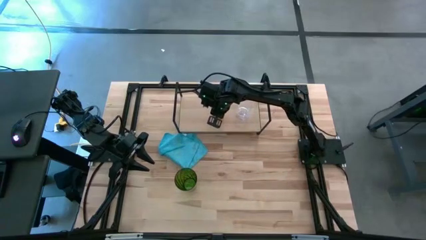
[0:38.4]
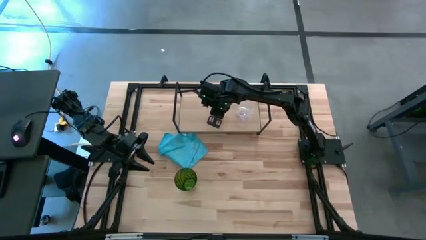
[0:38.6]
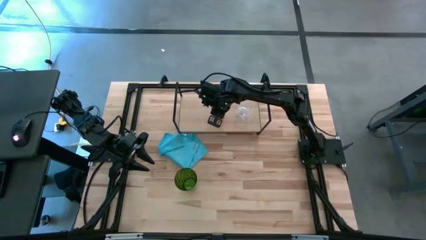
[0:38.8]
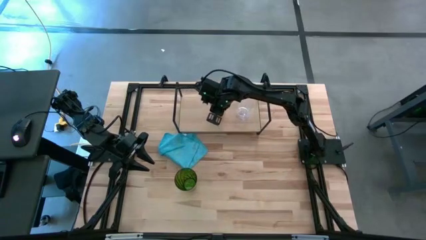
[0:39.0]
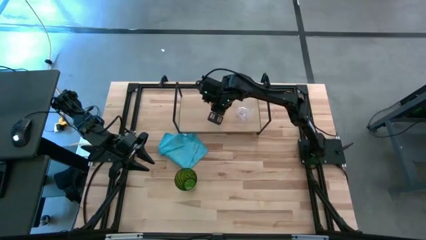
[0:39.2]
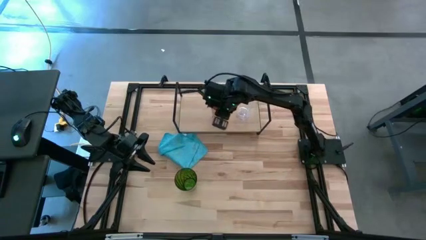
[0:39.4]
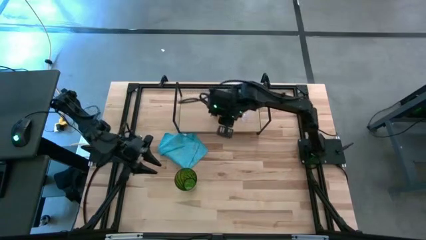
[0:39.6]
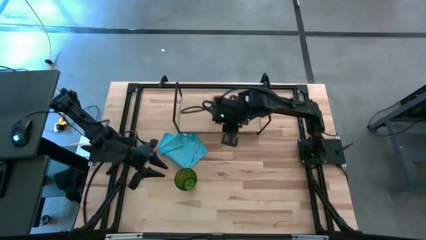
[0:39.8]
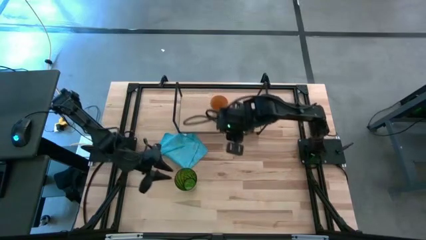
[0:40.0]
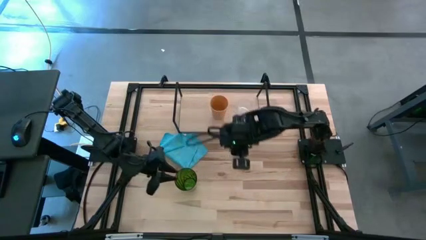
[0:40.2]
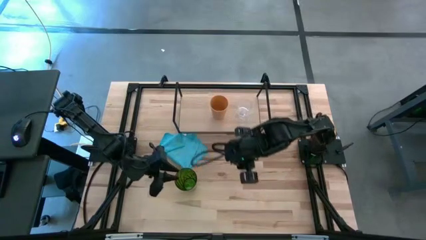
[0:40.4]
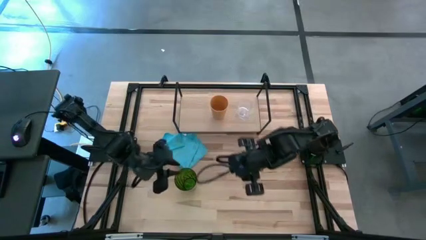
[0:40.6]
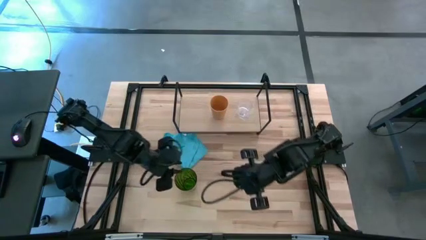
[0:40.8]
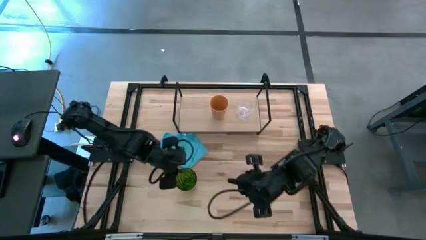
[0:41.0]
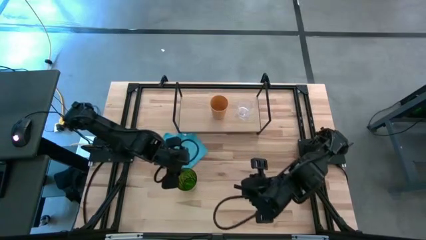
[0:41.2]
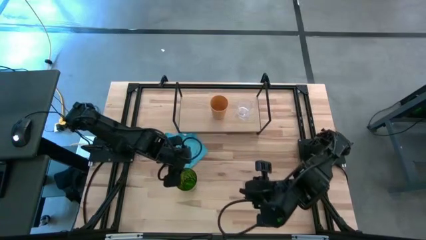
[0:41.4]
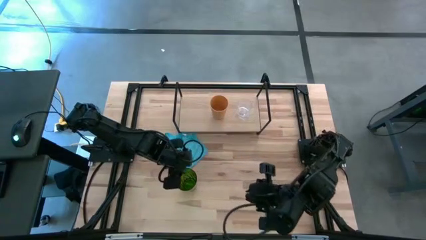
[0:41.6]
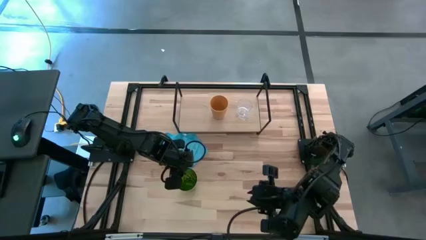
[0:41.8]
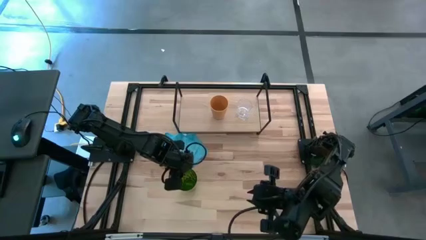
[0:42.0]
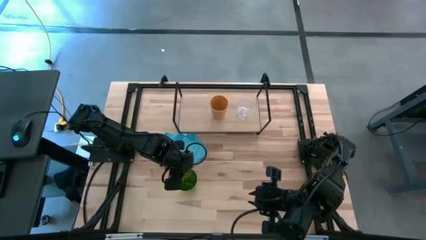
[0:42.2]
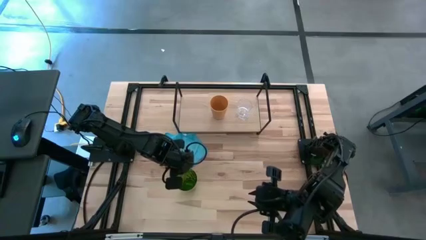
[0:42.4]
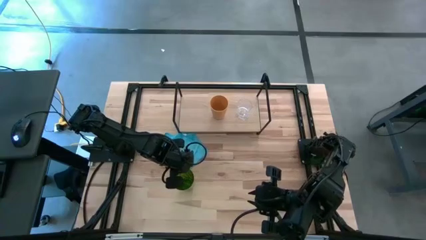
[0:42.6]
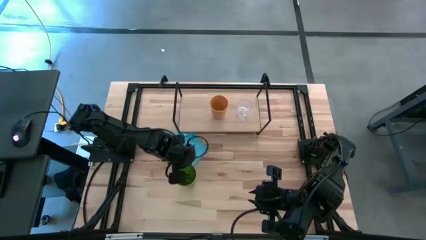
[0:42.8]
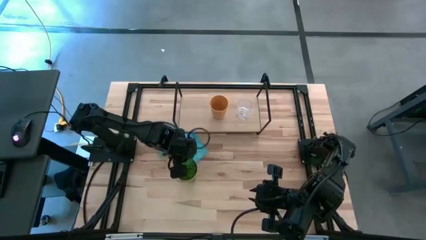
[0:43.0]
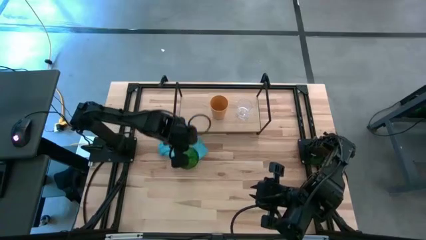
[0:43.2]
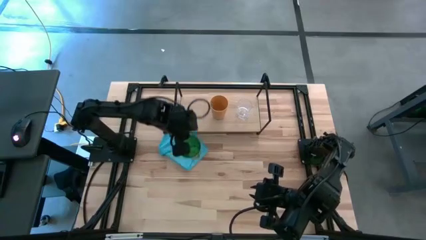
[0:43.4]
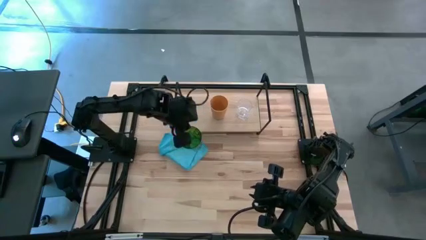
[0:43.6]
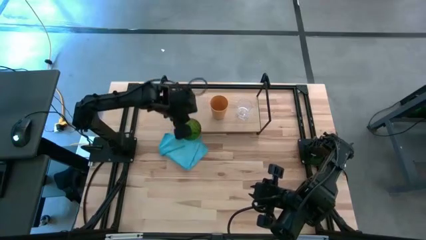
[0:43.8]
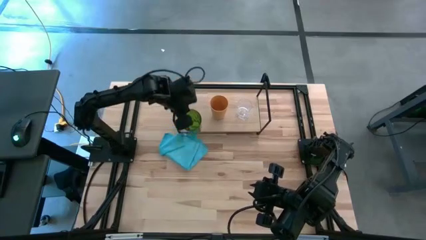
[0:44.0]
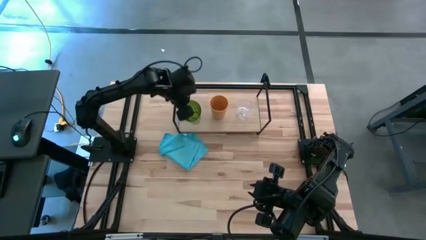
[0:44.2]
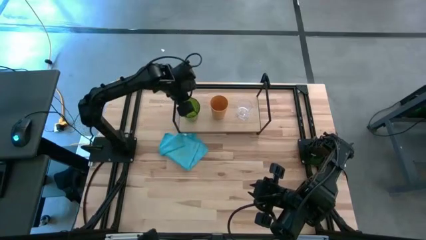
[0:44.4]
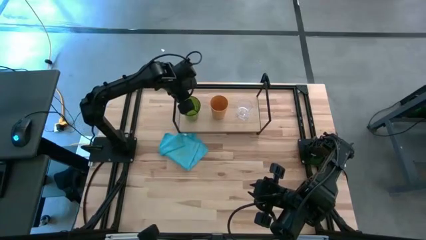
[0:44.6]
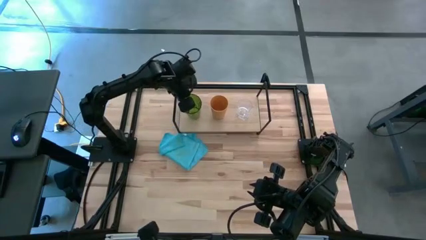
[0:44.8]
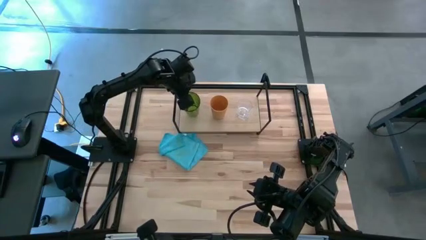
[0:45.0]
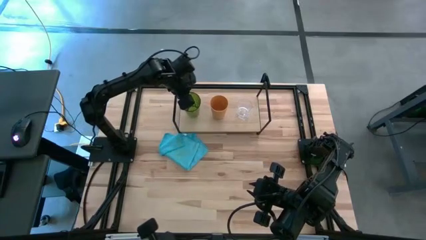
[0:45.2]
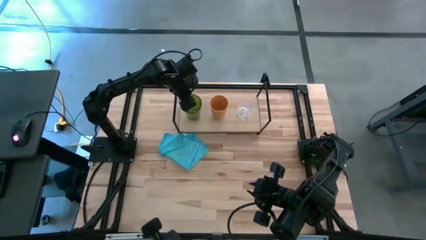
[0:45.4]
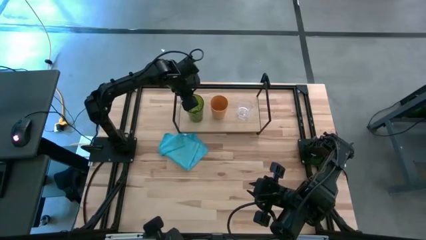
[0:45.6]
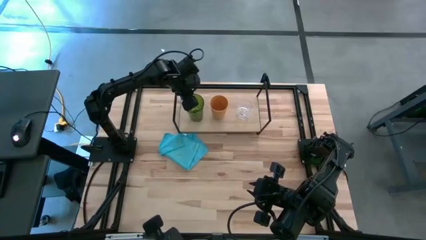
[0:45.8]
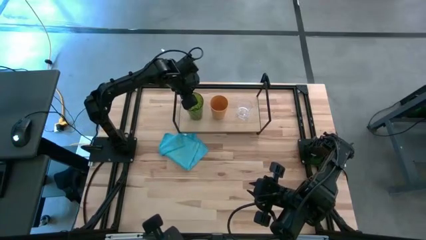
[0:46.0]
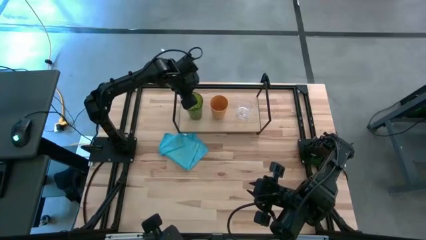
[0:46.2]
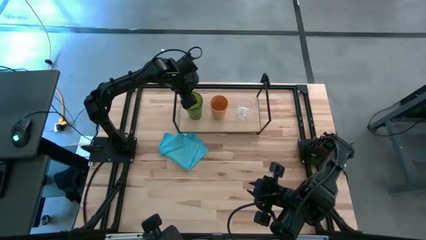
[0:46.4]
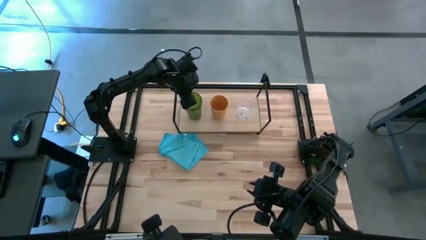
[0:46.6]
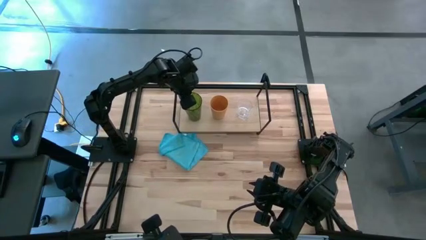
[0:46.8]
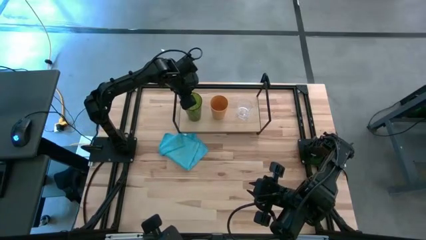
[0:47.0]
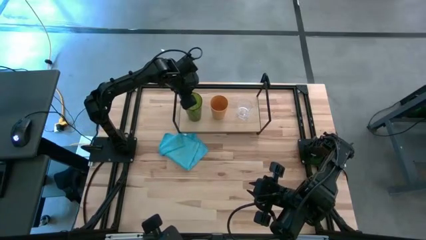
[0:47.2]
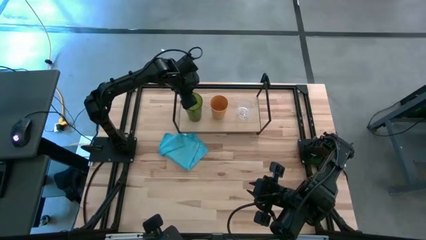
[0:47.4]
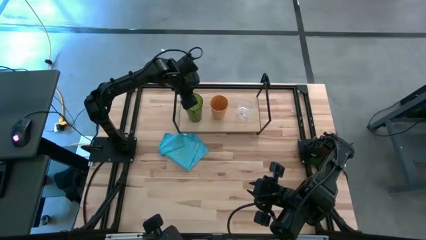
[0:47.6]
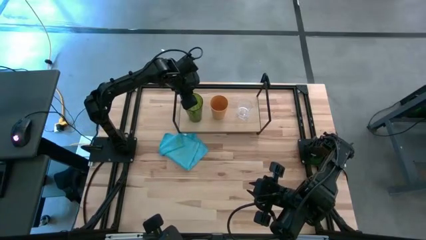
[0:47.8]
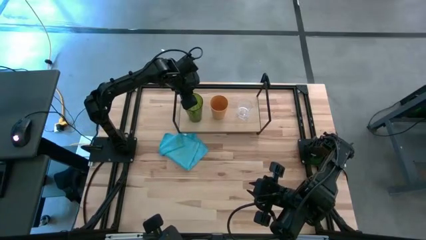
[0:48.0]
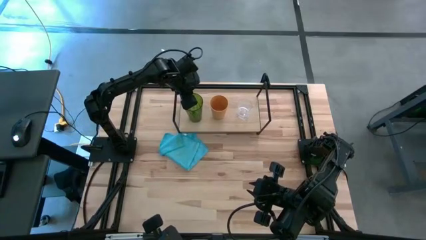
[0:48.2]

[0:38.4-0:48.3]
Task: Stack small to large cups/mugs on shelf
Put the green cup on the shelf

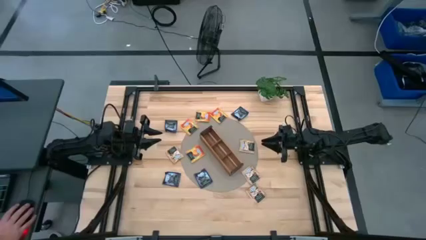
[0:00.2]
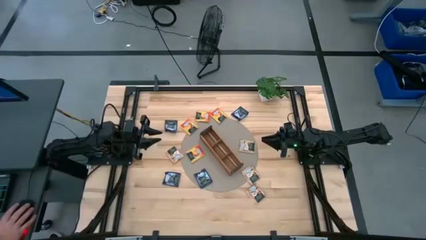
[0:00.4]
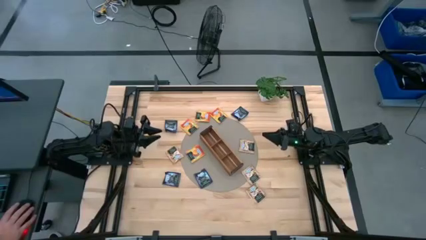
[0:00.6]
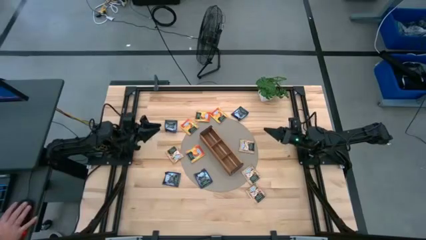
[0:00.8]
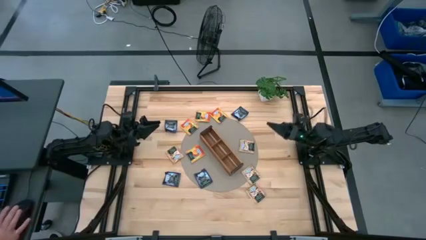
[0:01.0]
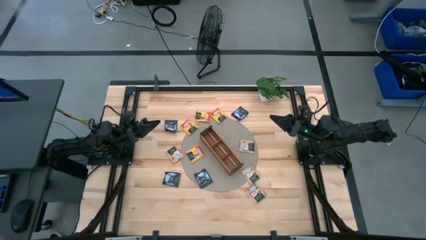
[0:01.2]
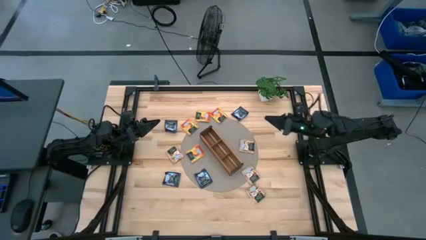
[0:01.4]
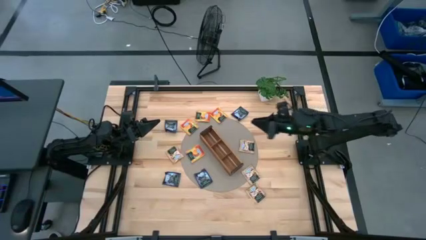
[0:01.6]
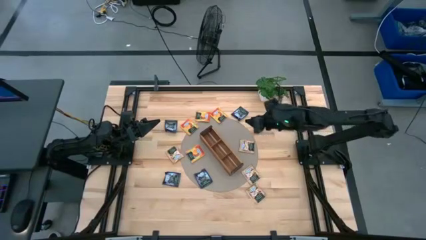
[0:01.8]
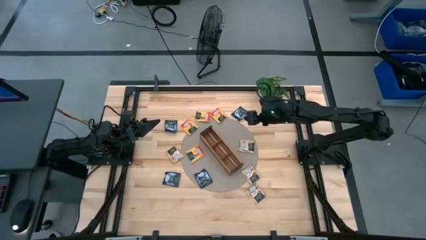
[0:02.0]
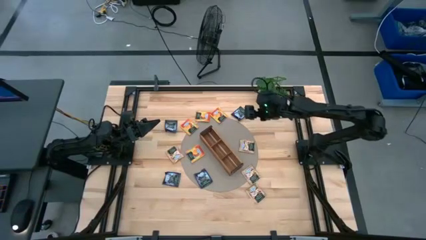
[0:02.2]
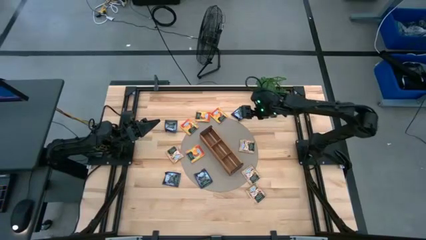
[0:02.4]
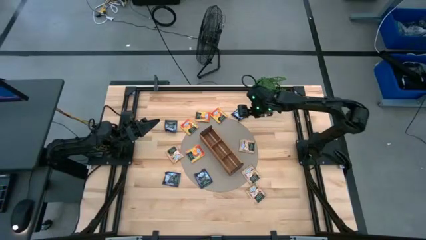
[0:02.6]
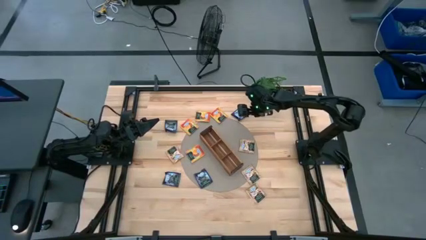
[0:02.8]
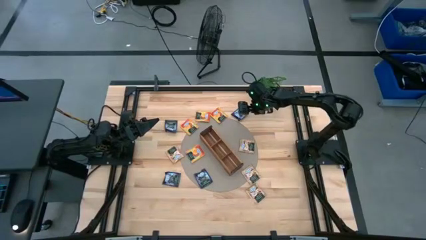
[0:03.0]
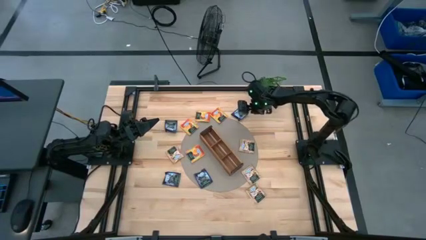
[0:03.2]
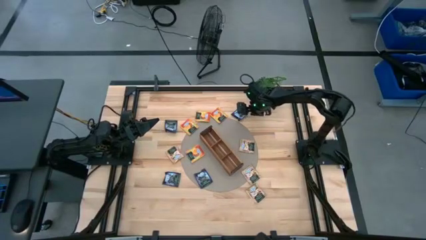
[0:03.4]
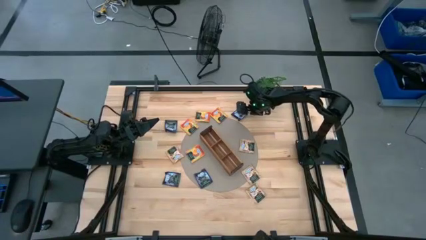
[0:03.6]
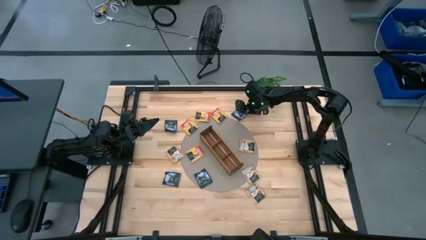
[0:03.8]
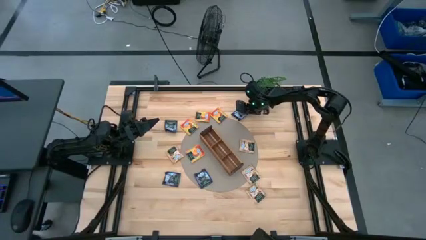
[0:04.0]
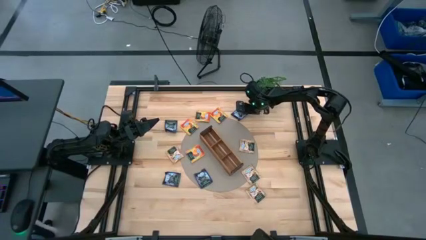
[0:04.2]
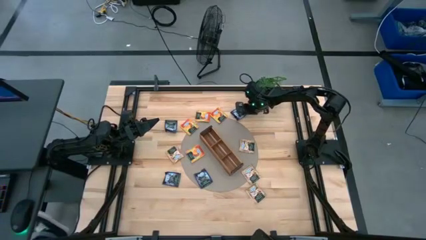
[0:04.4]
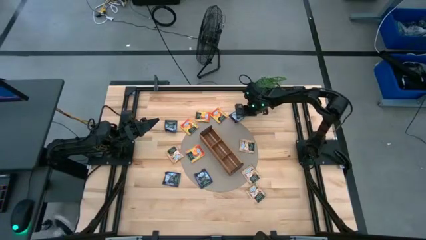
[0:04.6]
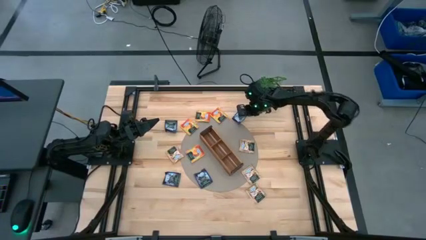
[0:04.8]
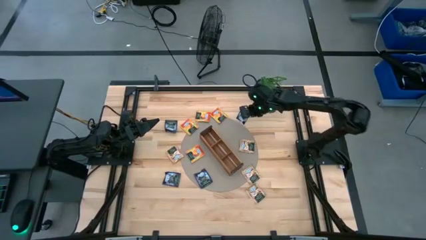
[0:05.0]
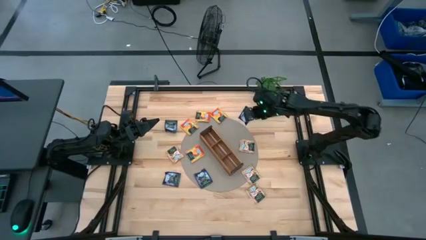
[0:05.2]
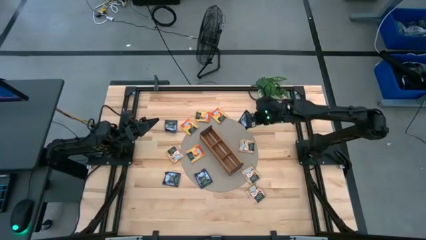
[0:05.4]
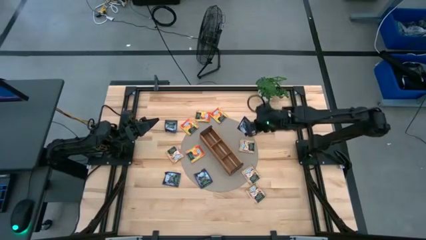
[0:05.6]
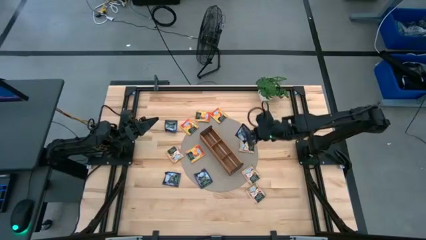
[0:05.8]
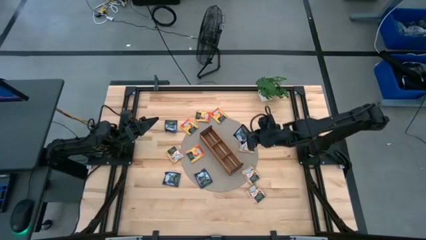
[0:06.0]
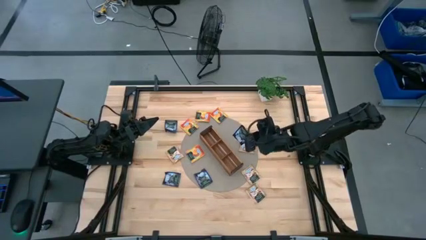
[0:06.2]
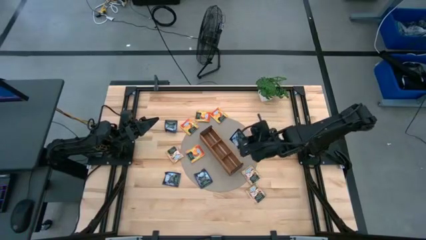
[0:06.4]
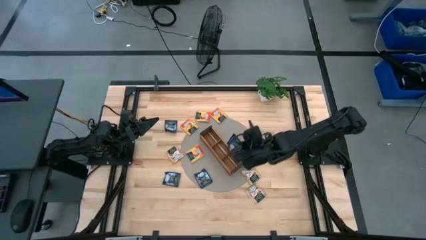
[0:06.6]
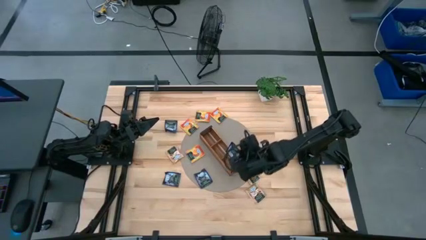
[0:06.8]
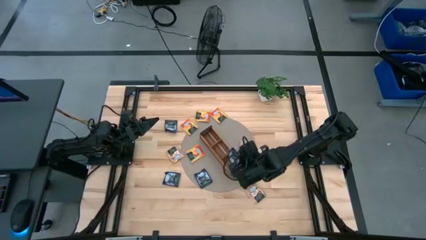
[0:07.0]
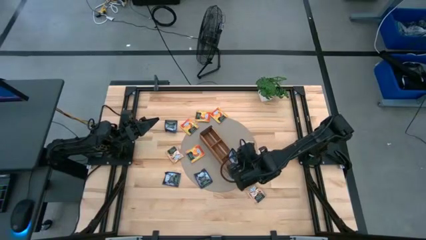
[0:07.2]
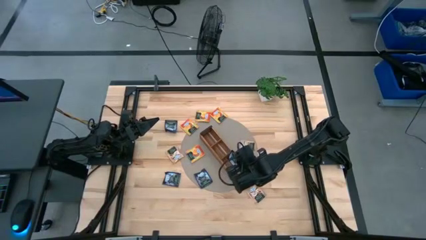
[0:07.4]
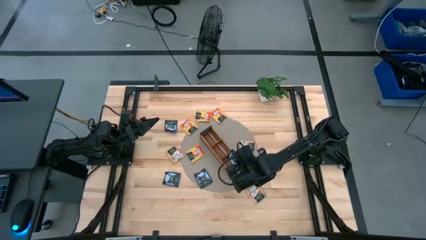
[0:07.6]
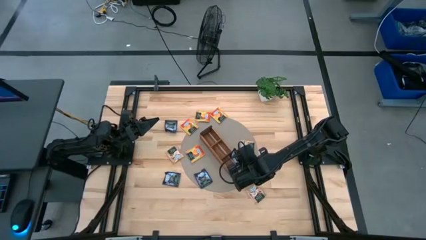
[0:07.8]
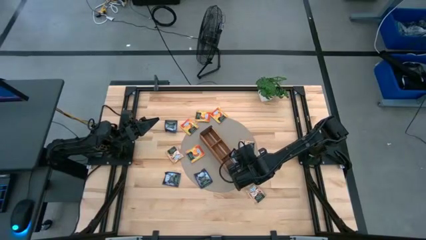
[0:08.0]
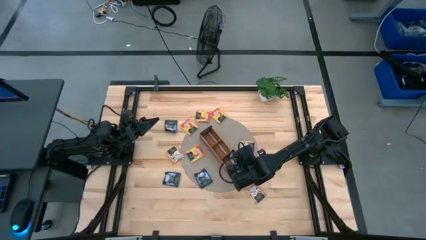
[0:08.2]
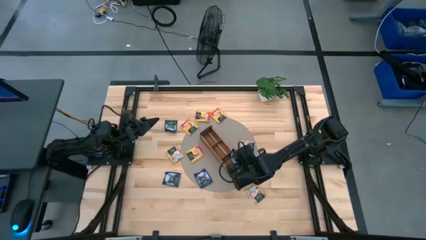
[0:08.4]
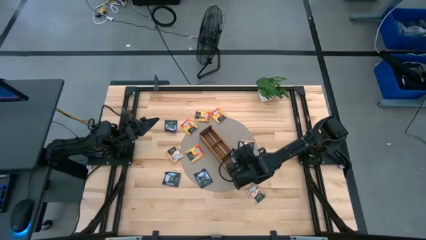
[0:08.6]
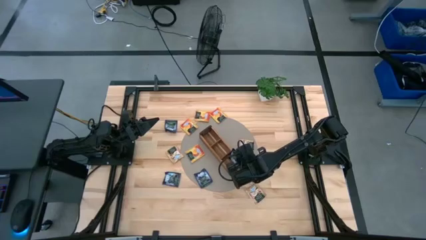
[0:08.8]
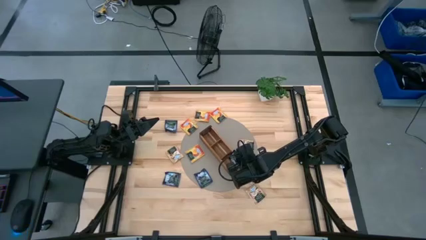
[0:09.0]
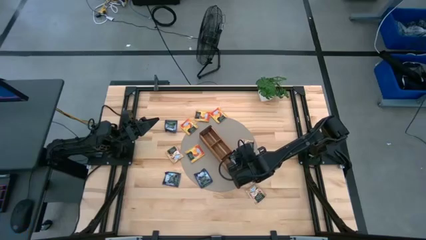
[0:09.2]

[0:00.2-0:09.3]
Task: Pick & Place Tea
Put the purple tea bag into the right section of the wooden organizer
